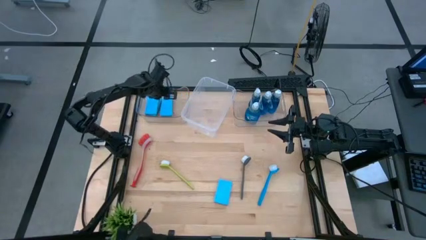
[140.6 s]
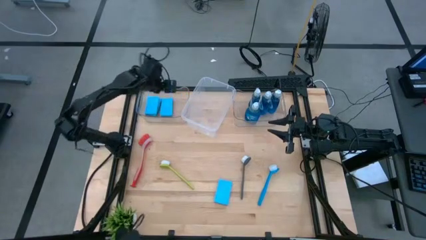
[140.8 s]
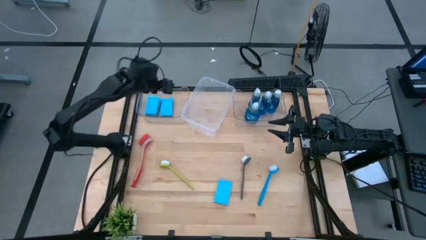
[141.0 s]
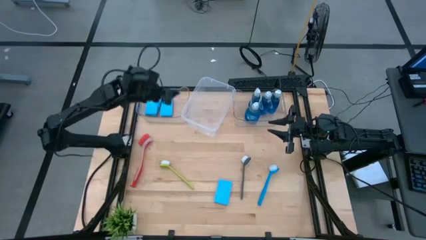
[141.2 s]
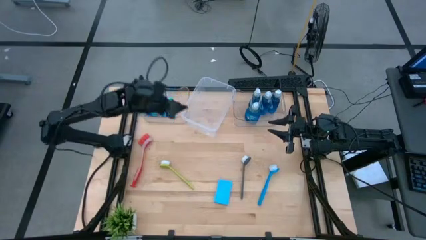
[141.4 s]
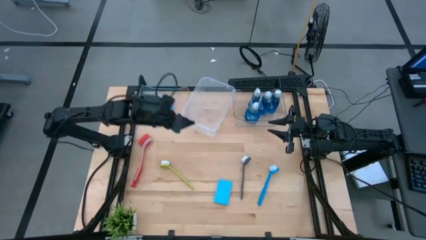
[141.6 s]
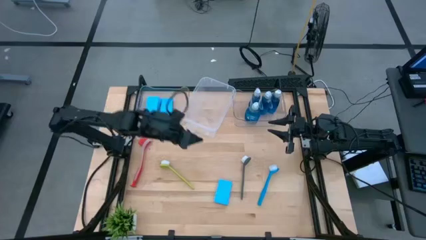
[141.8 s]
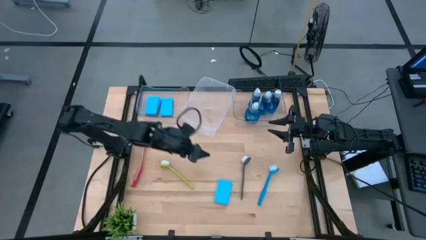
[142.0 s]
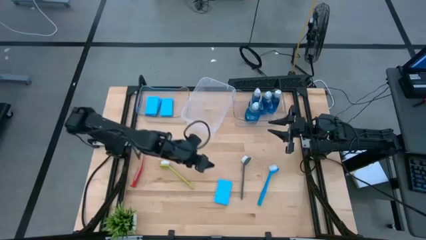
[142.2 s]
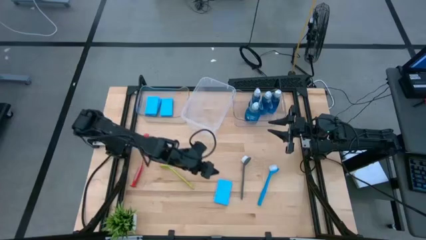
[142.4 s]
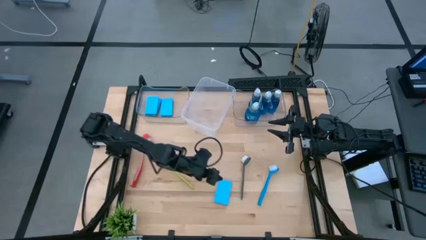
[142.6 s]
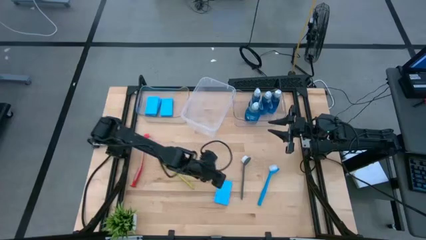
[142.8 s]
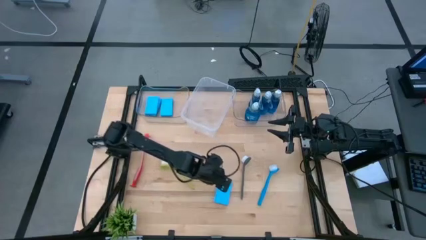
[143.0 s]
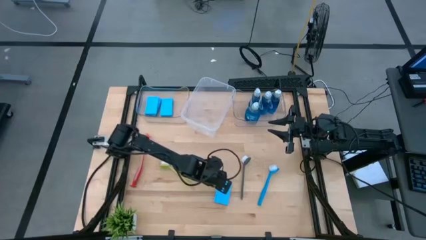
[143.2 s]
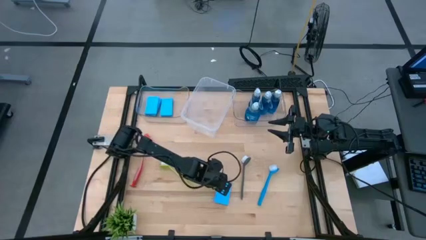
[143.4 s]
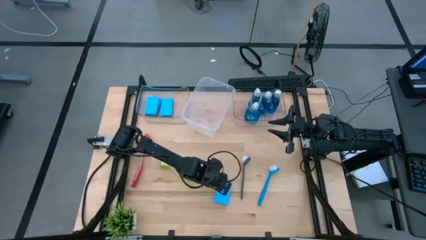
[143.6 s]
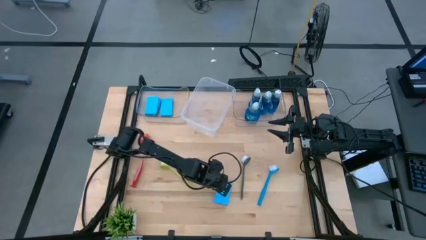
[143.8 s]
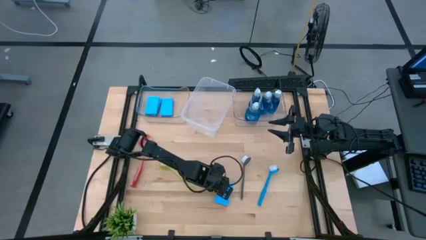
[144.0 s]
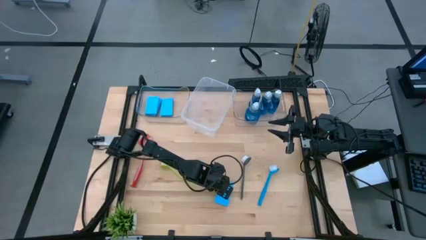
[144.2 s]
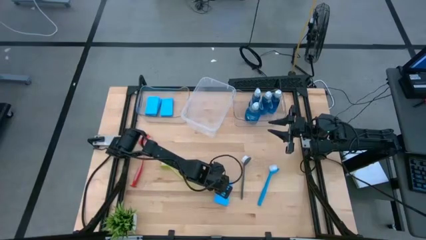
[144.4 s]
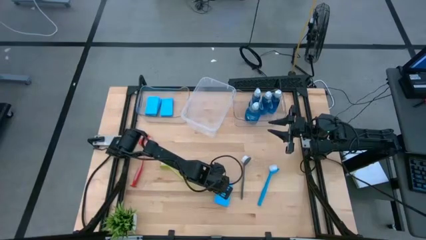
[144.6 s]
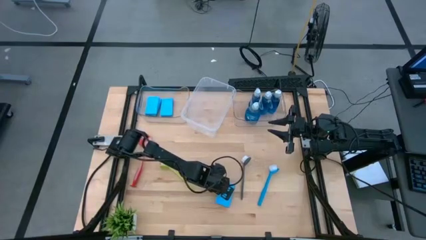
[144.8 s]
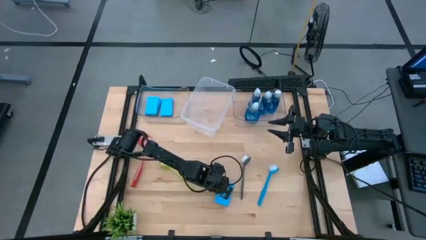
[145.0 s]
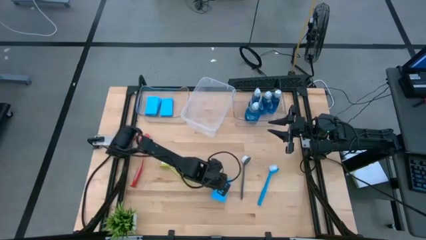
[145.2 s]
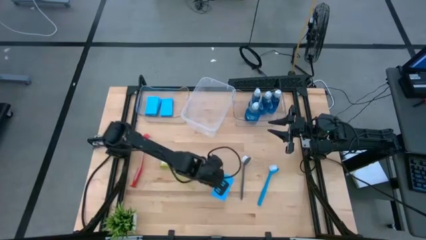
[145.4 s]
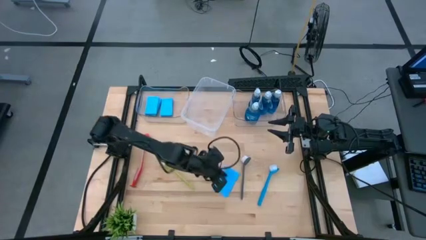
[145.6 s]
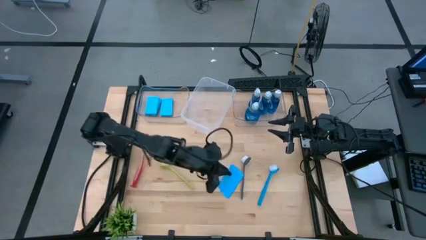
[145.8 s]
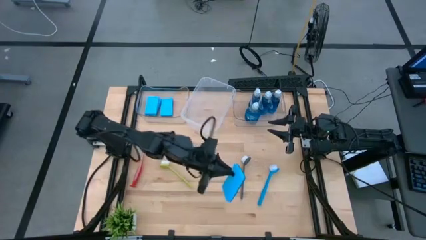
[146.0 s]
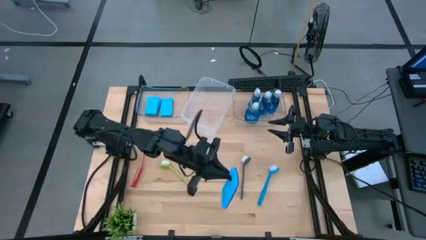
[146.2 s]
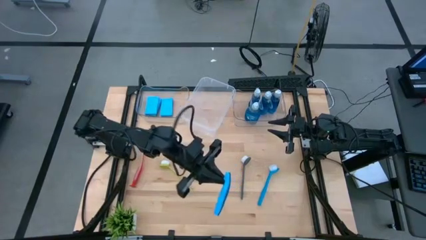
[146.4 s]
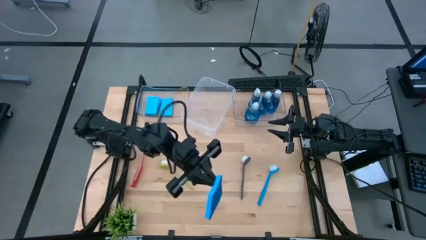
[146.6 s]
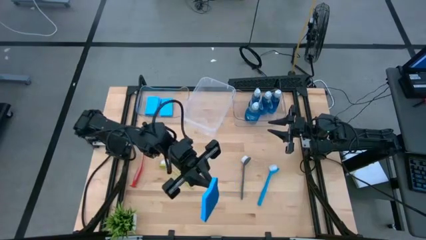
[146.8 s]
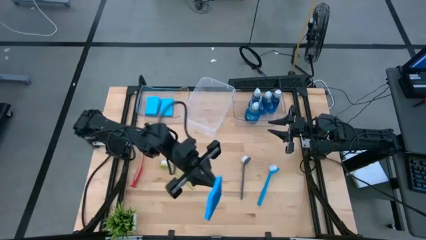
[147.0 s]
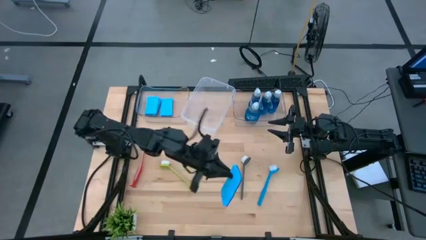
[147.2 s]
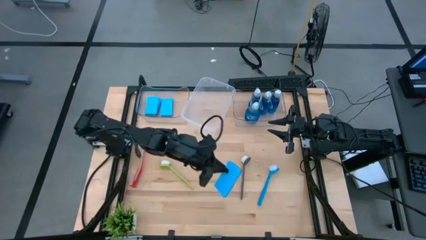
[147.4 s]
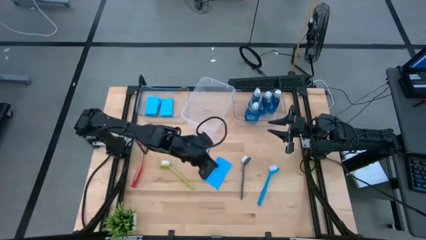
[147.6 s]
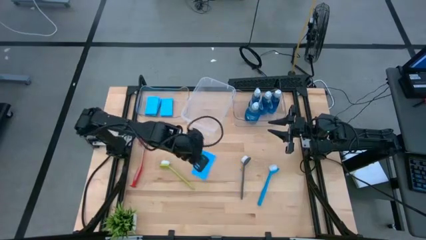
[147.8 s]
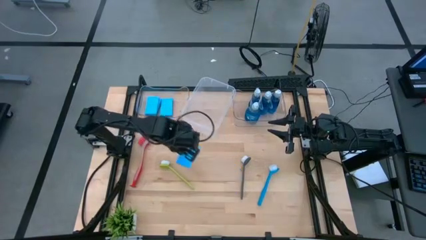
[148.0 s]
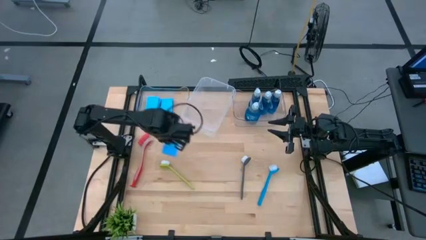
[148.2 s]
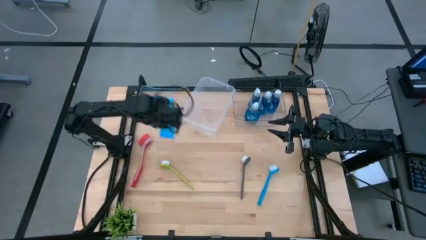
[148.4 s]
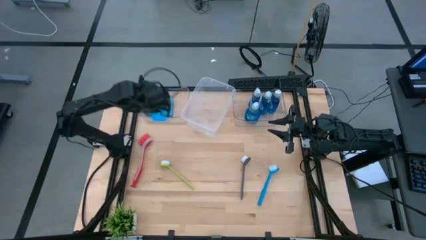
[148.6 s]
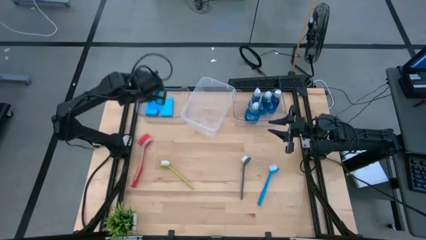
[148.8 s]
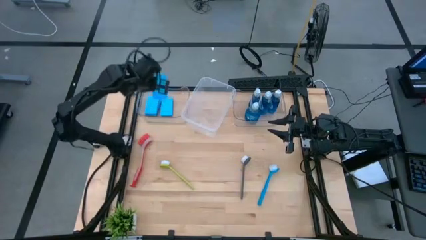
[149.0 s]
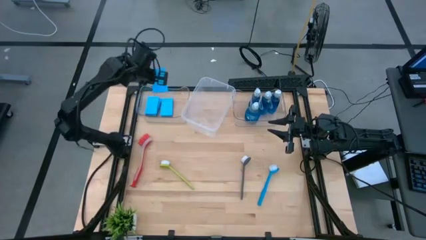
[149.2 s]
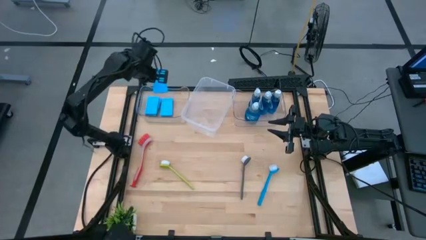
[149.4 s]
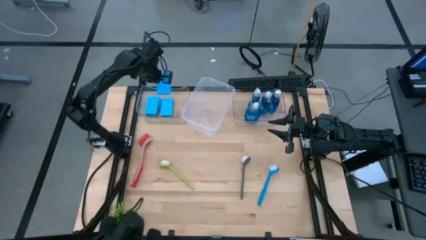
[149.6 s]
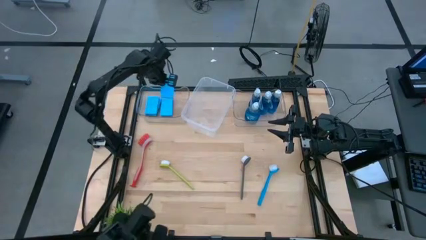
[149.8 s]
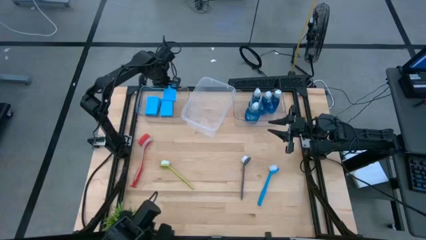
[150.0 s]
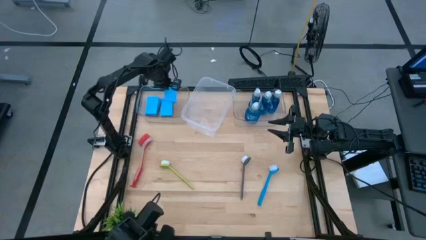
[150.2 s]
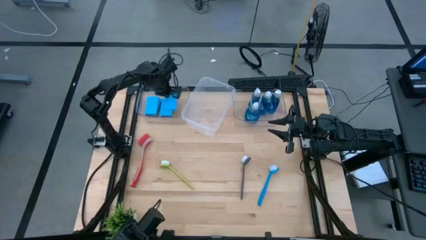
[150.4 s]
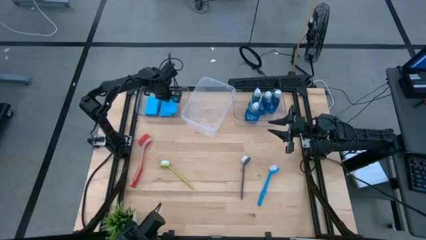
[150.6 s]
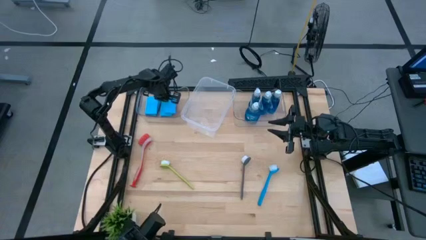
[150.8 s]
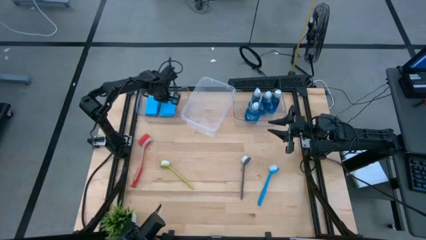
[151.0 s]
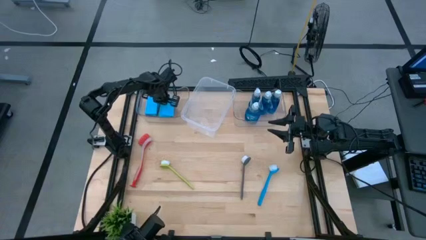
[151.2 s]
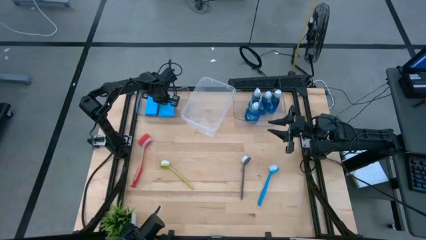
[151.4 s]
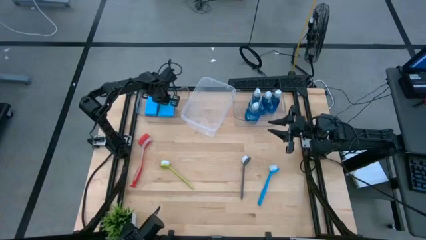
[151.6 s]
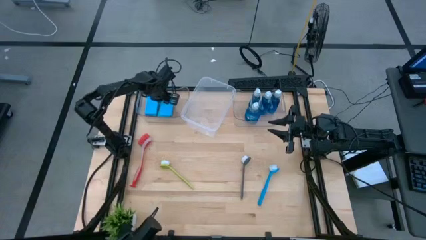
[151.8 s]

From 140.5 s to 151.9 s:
Task: Pick & Place Kitchen Sink Supplies
Put the blue sponge into the left transparent bin

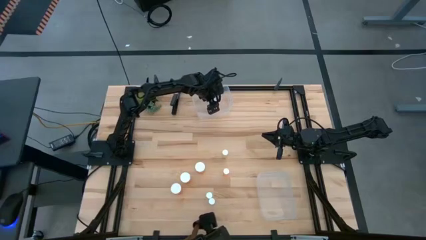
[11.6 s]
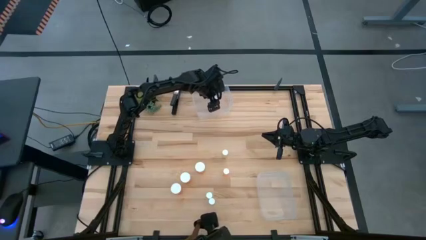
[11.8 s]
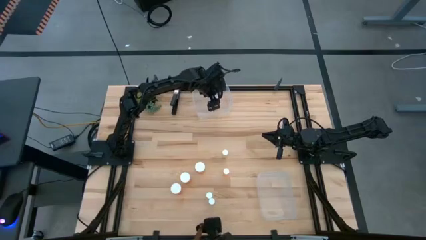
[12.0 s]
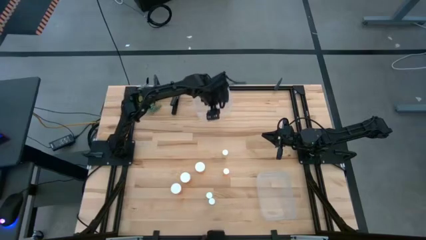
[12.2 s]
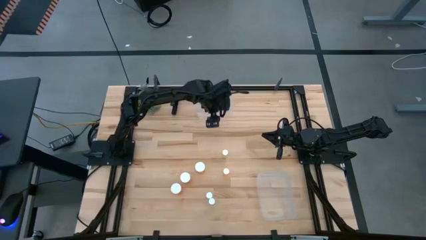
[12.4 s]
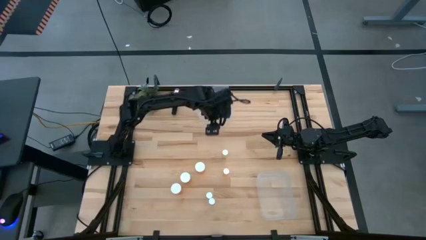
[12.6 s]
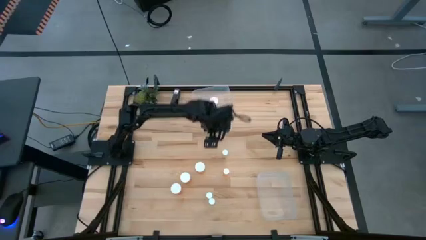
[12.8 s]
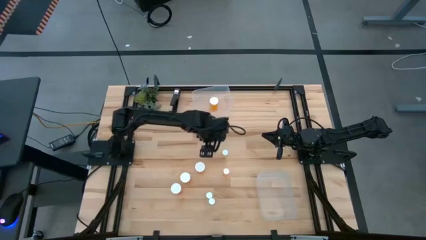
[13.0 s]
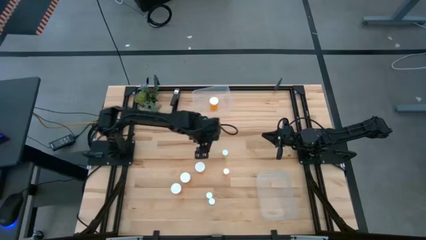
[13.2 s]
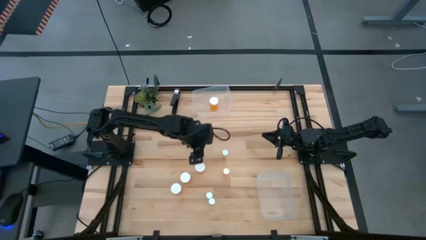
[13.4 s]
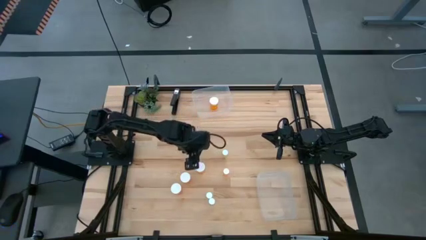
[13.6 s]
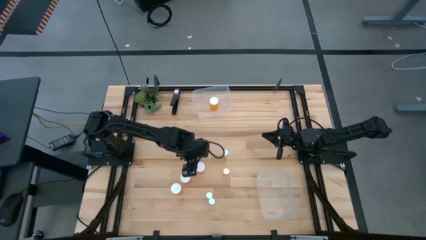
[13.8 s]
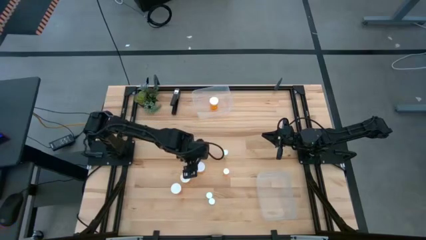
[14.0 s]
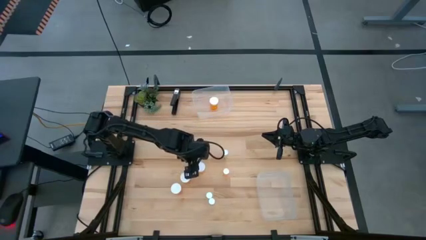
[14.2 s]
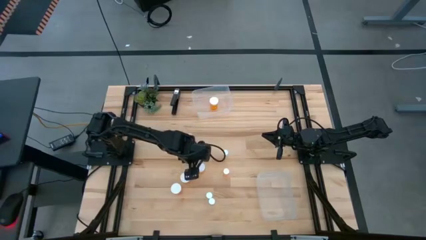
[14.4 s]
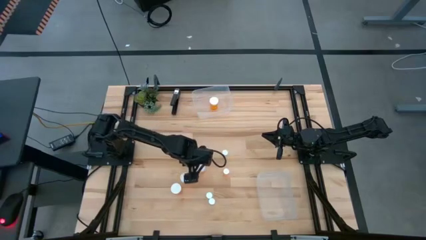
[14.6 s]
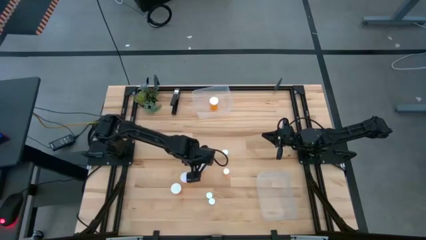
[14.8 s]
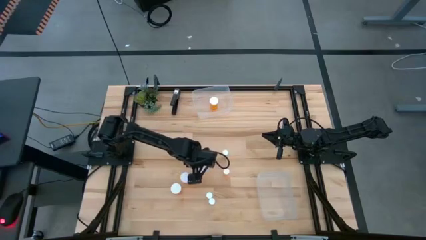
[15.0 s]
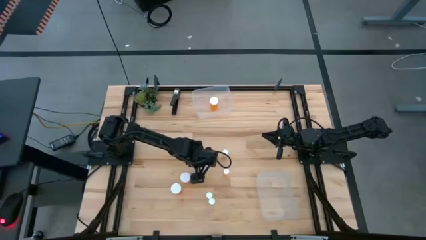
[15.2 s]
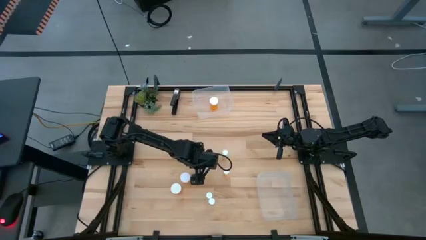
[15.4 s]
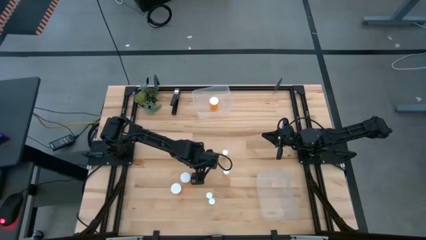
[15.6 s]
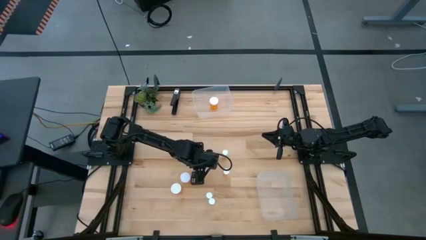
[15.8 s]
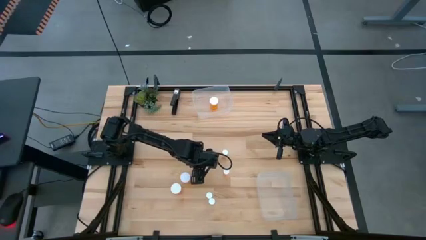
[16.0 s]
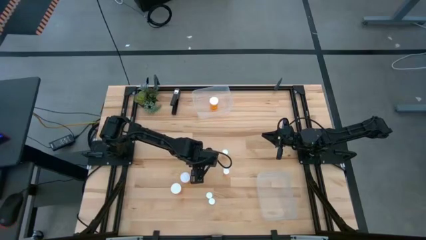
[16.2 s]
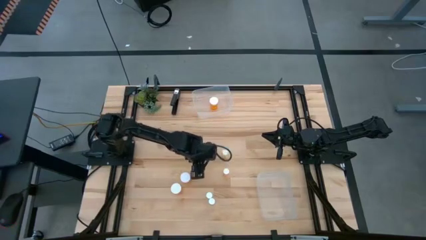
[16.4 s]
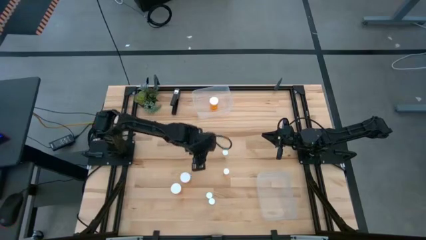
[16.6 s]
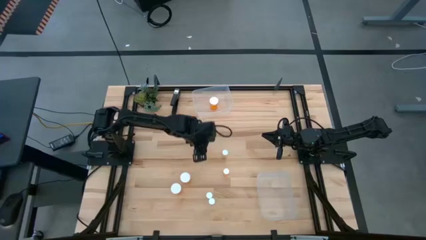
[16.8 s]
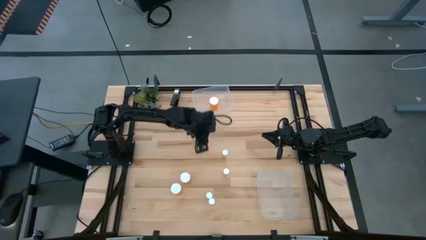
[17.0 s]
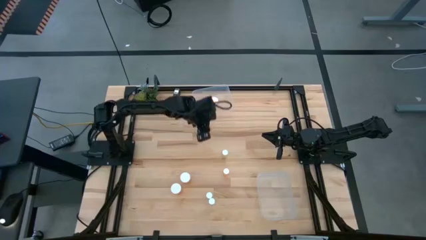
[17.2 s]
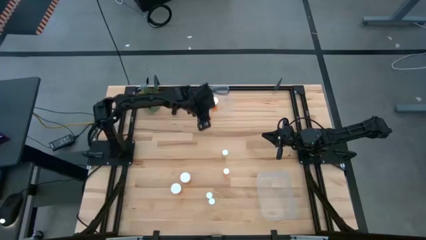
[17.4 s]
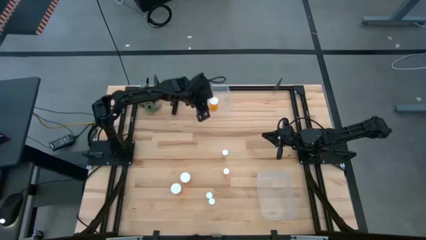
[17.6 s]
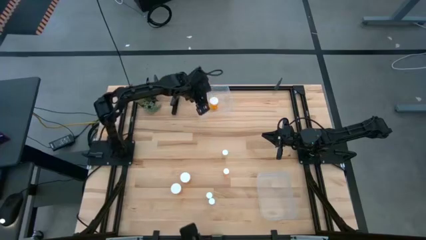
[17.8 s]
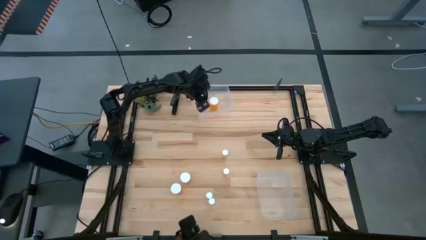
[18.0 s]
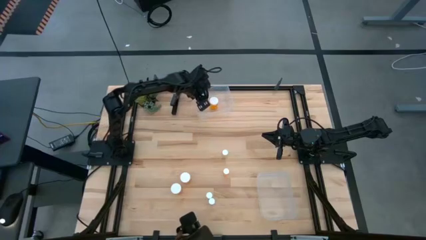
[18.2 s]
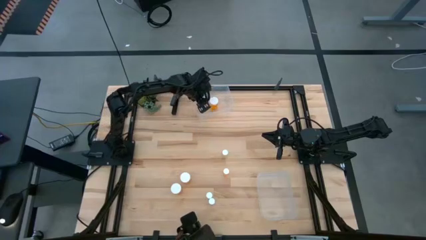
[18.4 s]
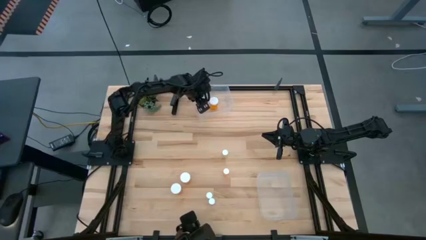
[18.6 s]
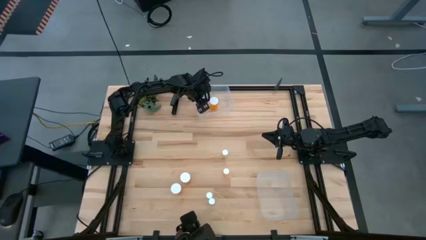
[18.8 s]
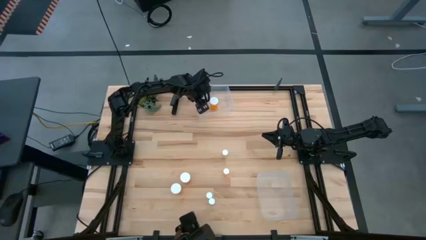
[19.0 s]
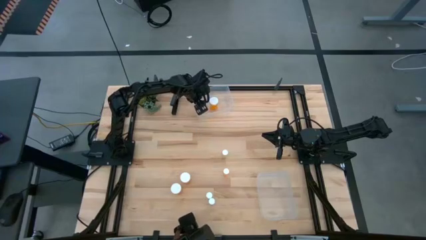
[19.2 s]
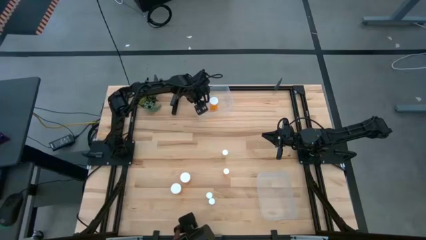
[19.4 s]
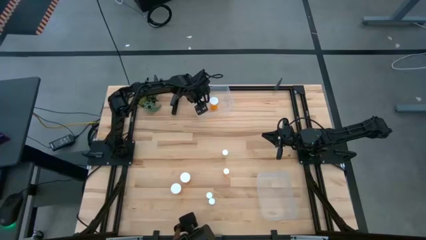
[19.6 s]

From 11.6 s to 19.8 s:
Task: Pick and place medicine bottles into bin by pill shape (circle, oval)
Put the big orange pill bottle into the top transparent bin
